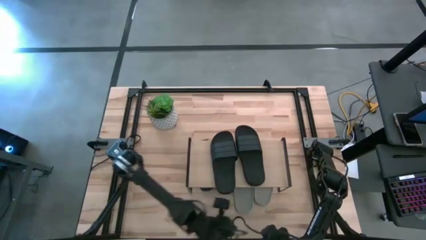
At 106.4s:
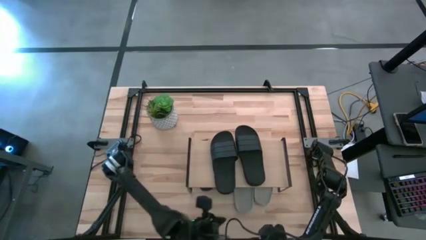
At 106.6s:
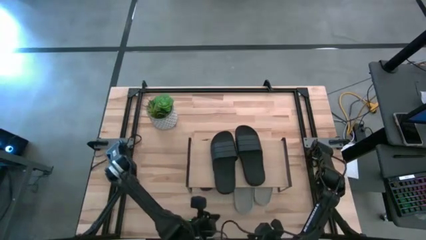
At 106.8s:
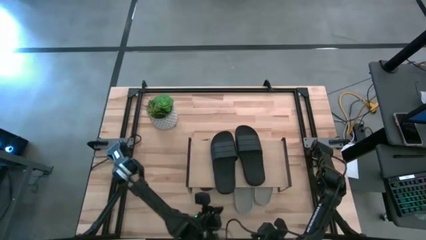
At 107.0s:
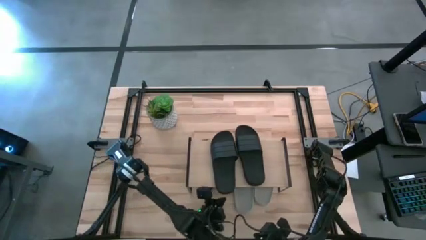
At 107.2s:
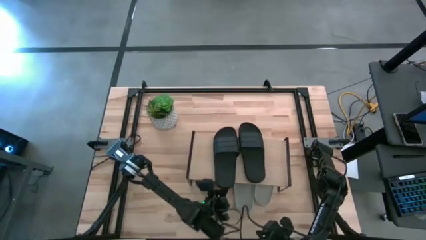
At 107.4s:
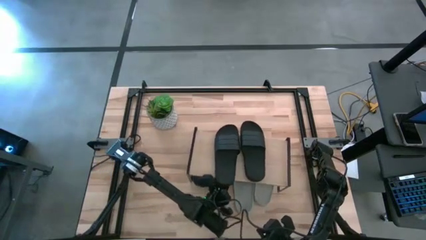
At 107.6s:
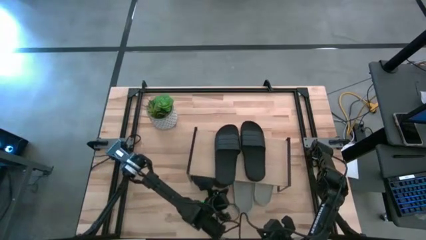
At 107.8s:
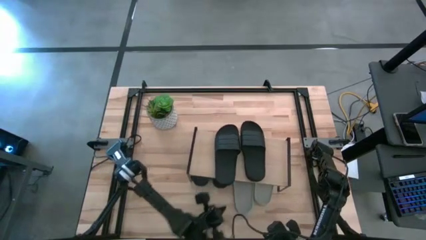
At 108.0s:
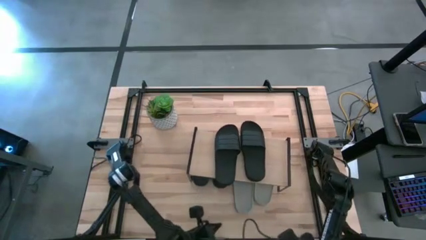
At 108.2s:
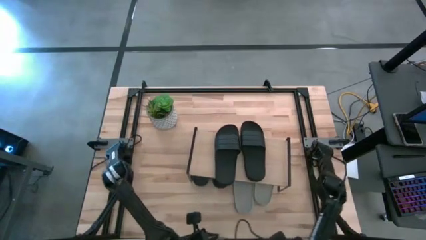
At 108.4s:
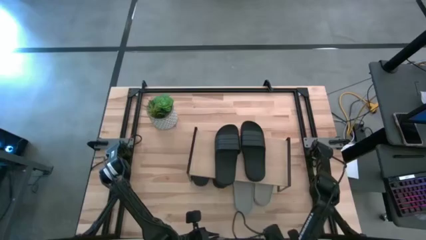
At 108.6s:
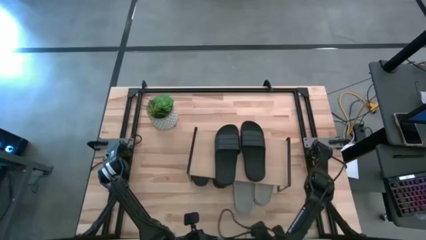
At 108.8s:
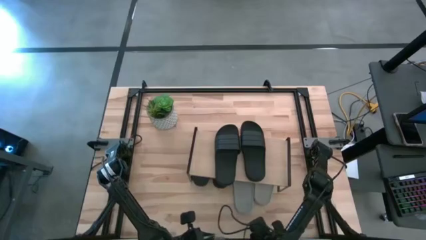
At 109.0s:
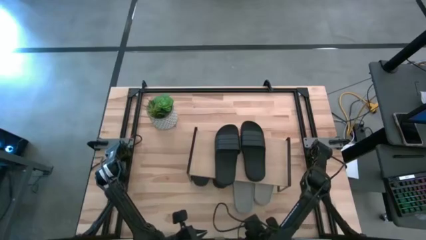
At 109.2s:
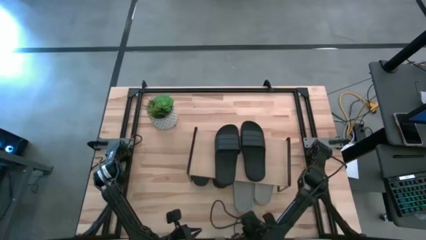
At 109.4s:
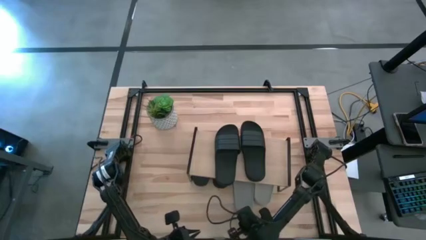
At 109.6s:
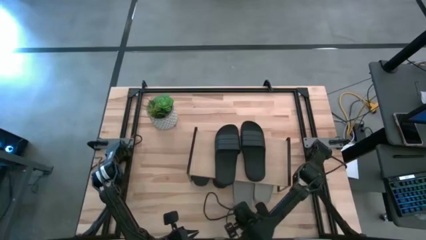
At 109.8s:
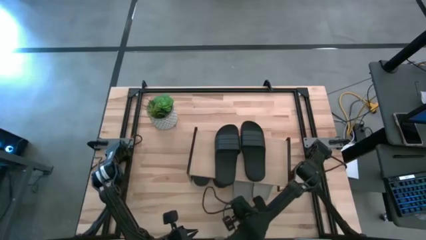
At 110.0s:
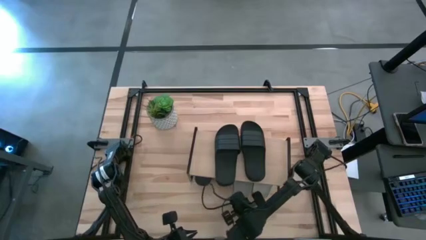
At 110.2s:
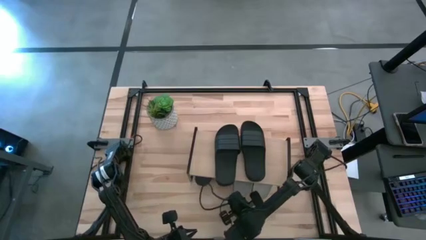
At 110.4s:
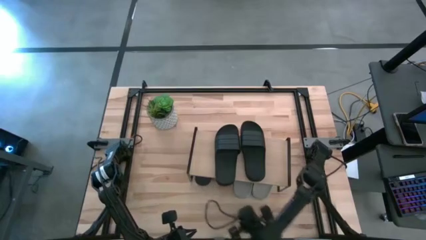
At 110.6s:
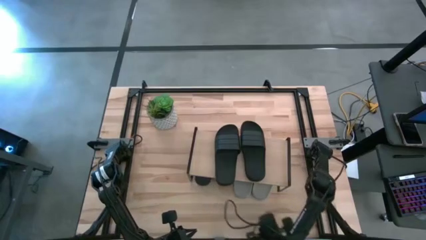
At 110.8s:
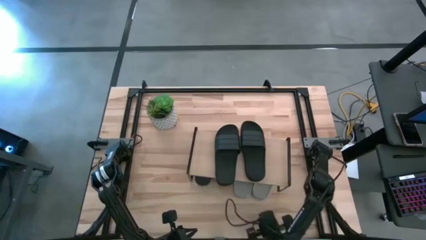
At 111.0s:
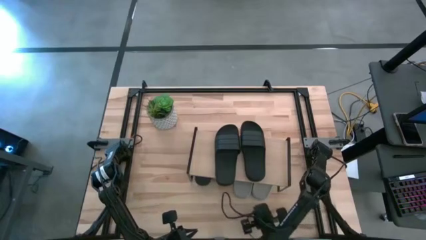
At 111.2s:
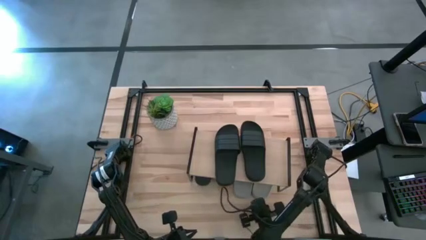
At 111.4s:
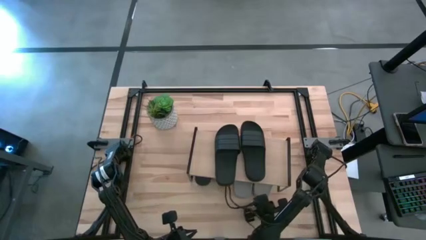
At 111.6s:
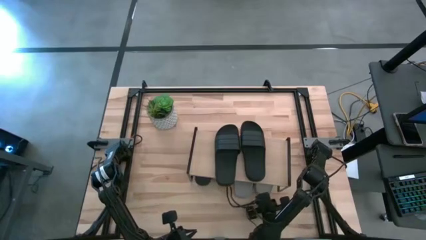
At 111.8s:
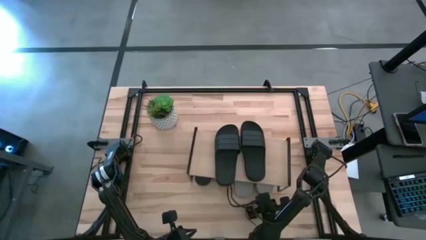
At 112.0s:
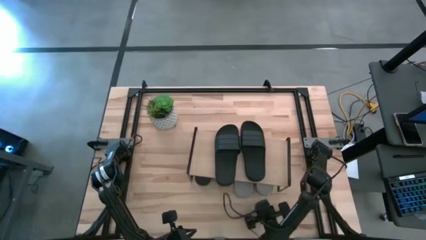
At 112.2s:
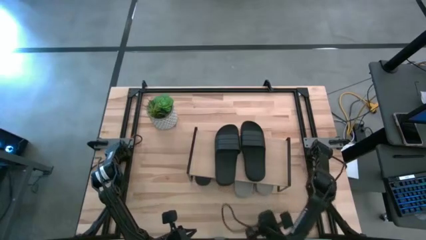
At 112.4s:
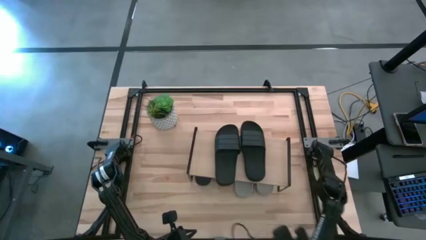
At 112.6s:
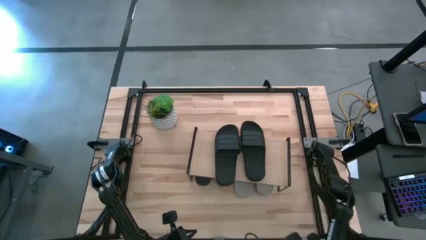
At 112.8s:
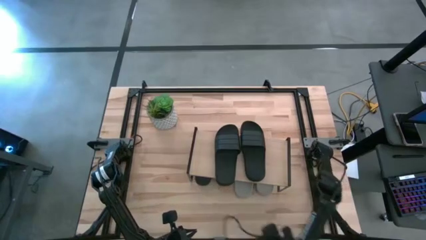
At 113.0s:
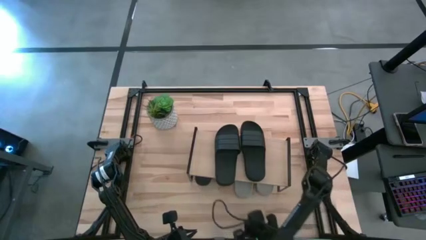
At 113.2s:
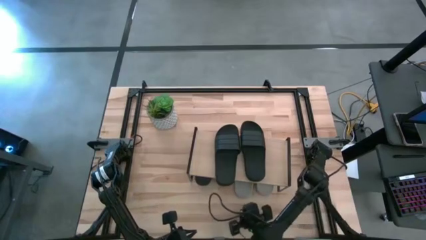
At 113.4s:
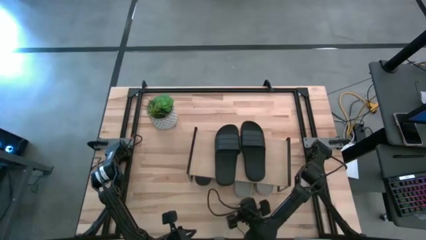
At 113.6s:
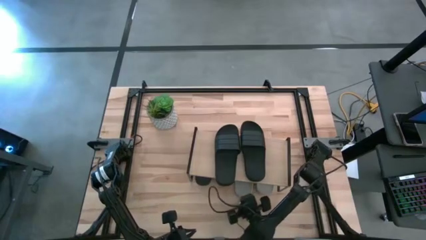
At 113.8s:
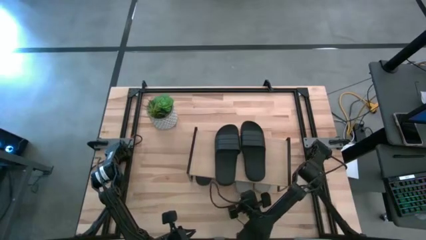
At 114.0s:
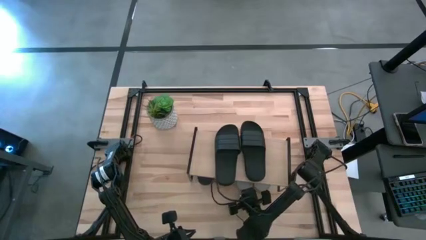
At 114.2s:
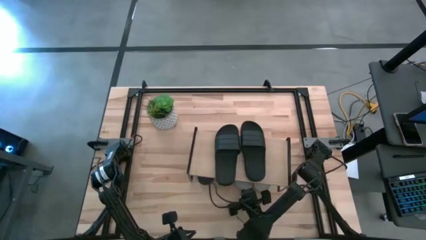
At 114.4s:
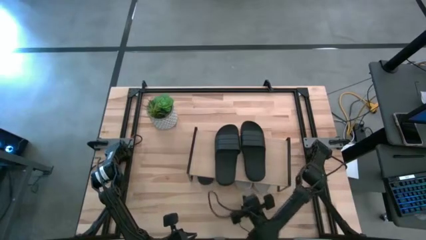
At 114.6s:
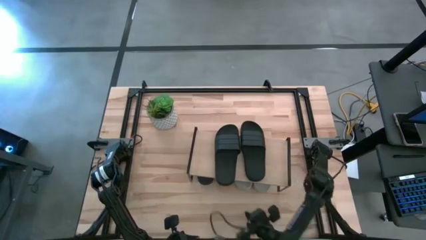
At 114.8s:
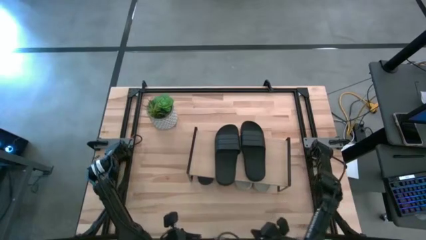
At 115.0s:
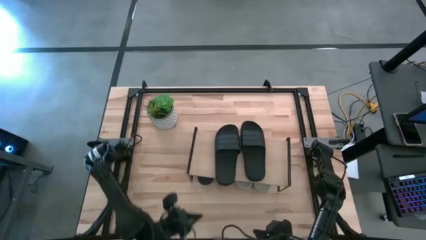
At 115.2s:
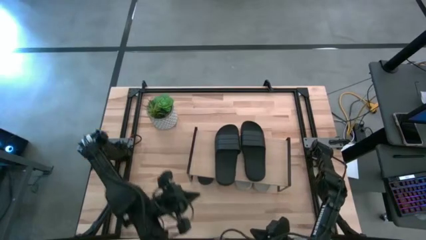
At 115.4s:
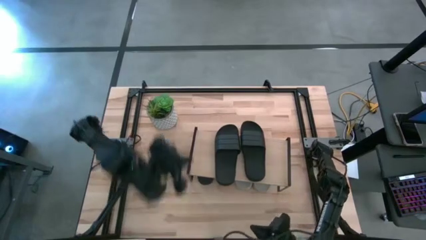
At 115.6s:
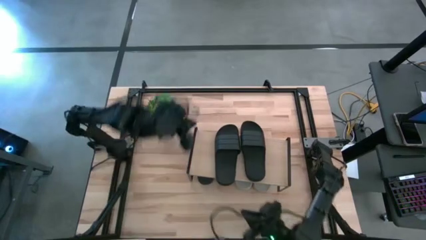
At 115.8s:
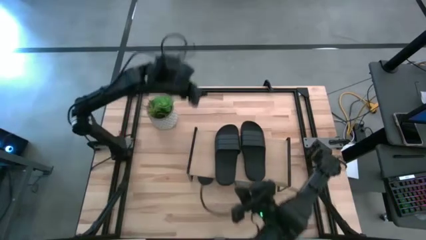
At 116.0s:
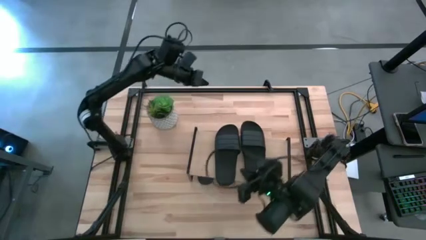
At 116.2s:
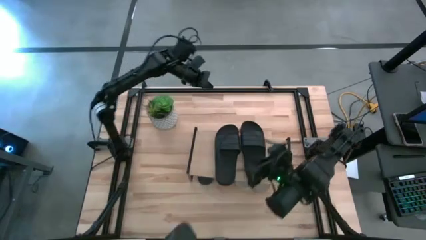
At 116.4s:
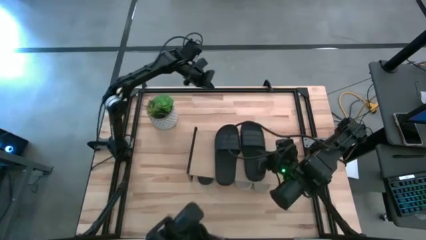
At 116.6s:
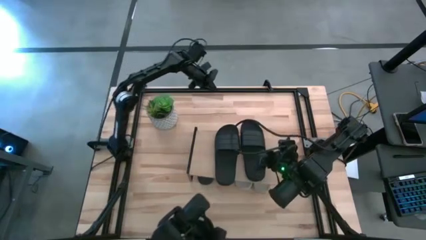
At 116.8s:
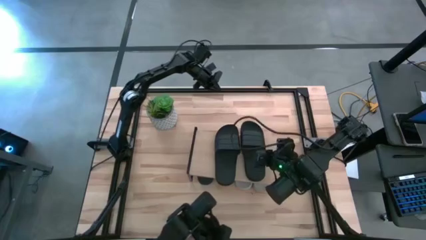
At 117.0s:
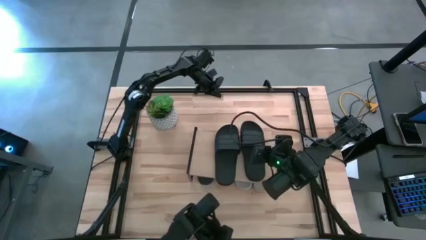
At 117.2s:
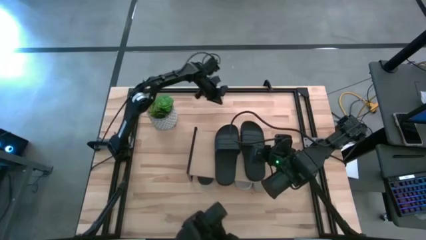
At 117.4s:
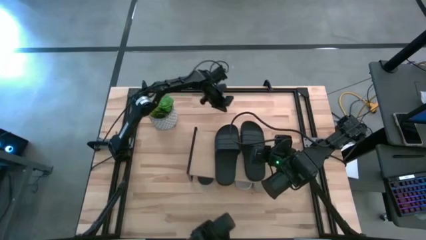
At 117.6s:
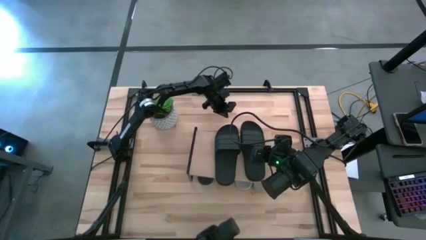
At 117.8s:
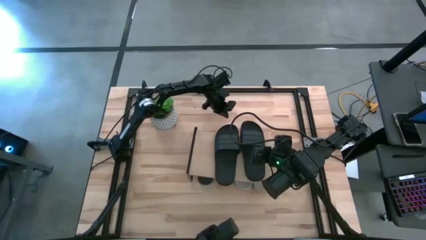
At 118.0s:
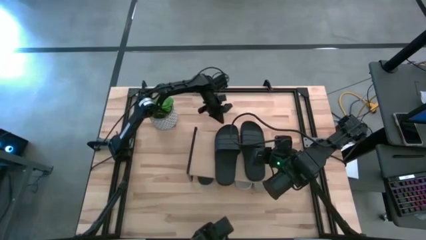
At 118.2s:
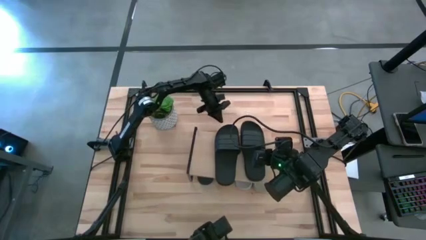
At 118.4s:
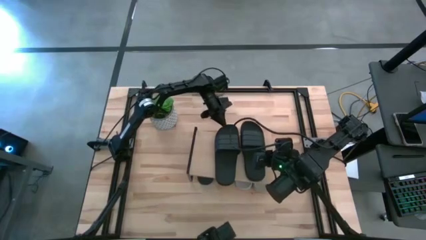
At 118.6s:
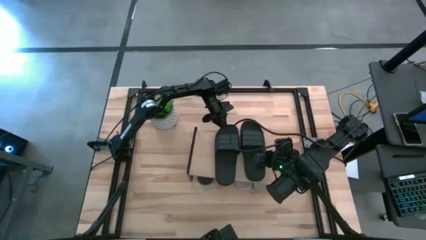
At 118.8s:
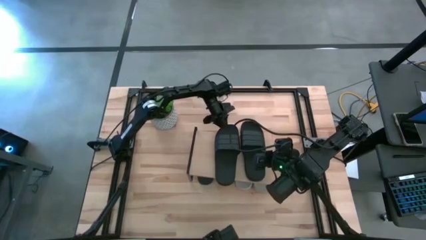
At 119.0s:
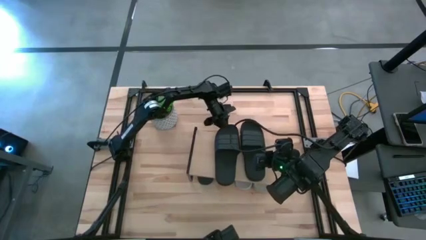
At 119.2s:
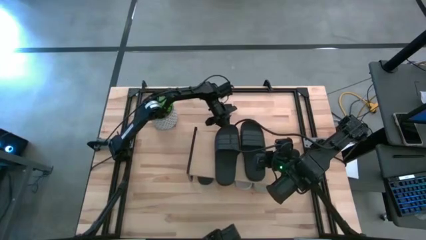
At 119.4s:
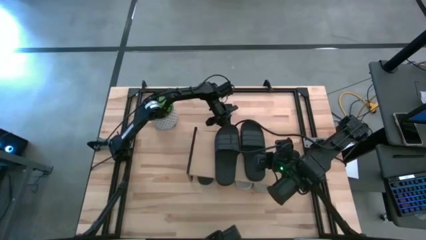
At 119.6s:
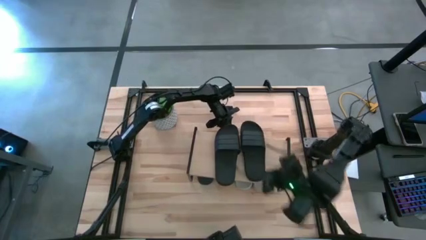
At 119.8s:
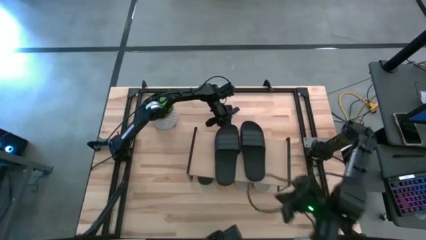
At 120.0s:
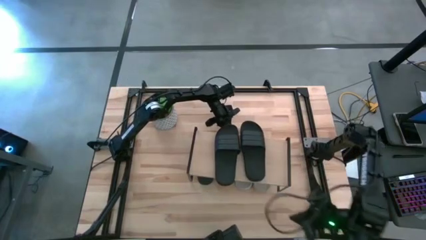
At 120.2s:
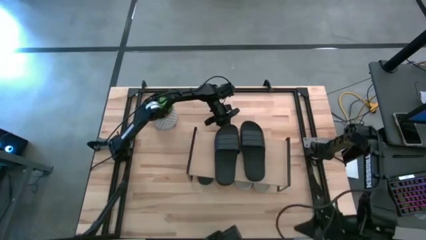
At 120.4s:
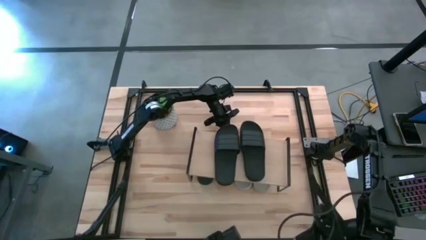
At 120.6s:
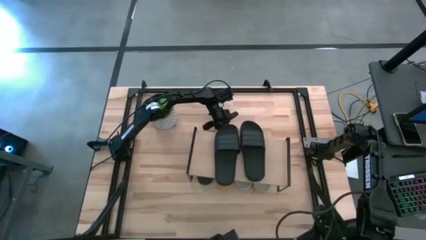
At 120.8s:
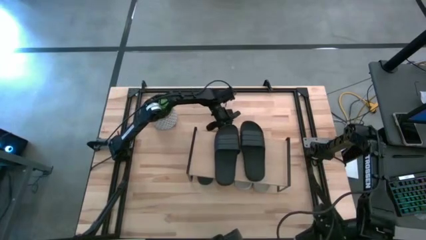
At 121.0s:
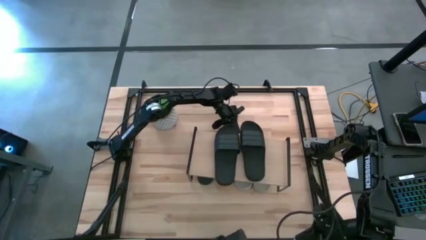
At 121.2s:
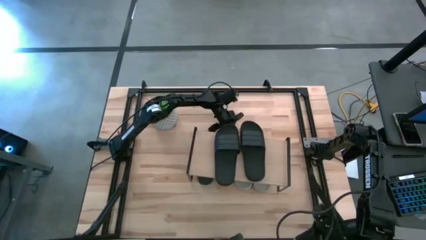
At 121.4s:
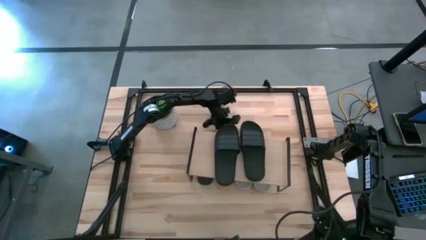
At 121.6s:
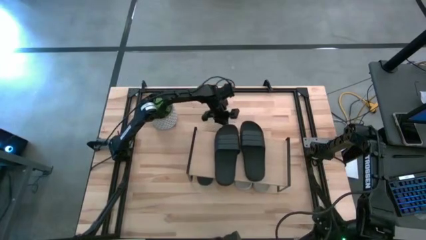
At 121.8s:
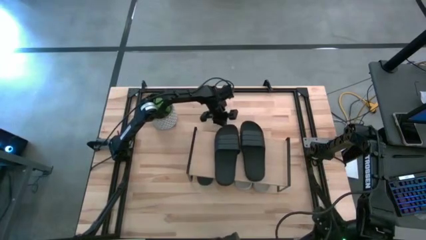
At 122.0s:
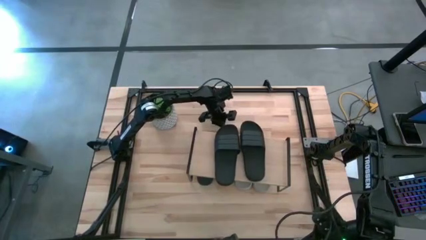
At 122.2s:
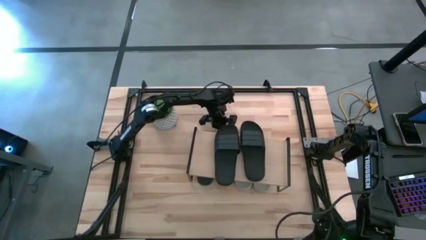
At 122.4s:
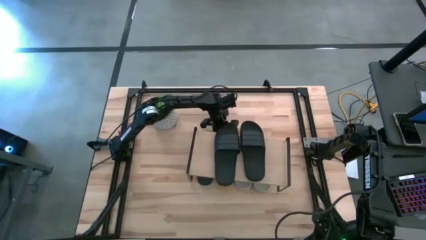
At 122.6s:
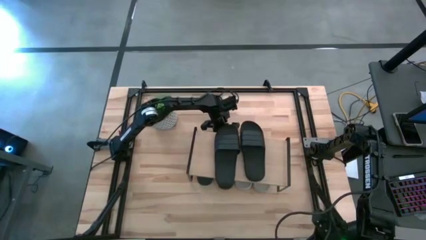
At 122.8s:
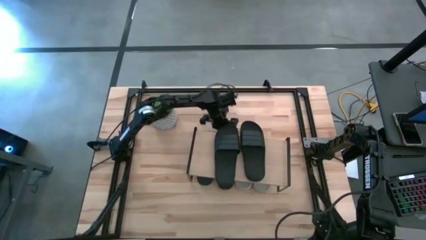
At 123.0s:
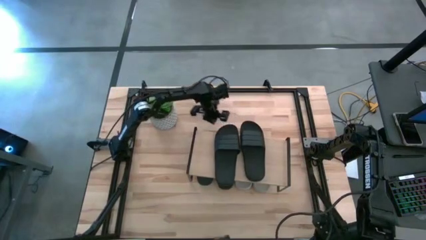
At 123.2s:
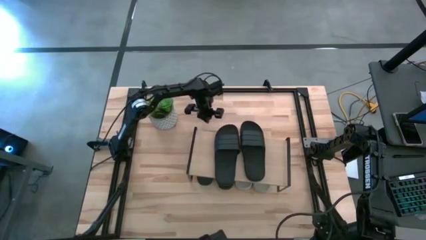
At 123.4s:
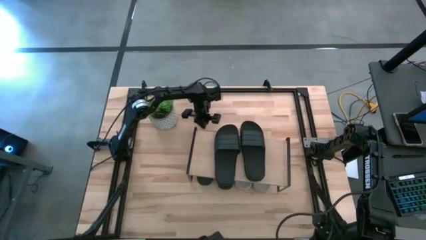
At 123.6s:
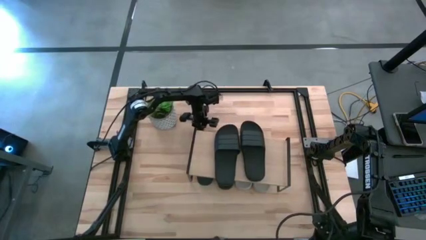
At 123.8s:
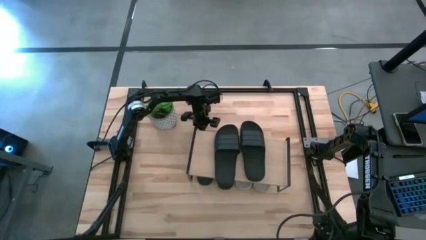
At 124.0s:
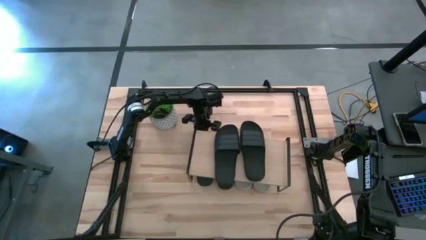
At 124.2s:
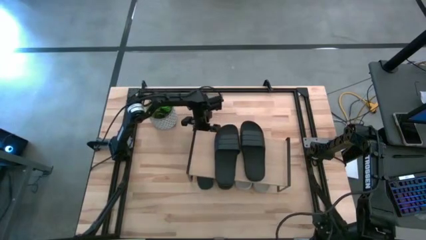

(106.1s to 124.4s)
Task: Pick and place slides into the shelf
Adjust the slides under the shelf
